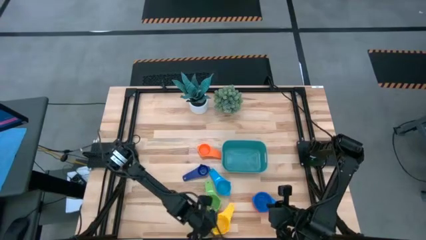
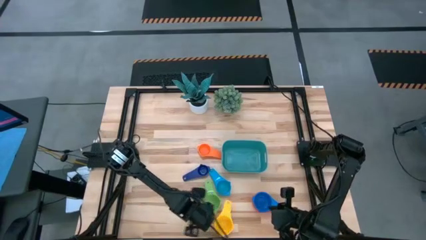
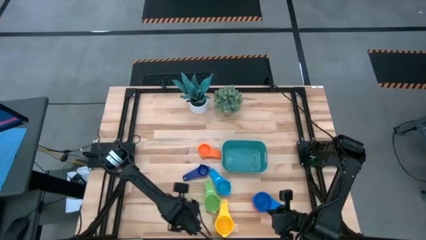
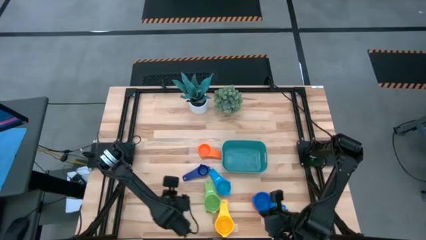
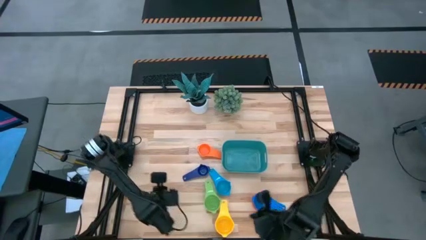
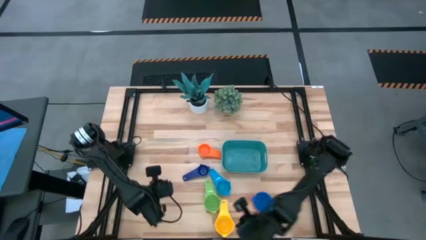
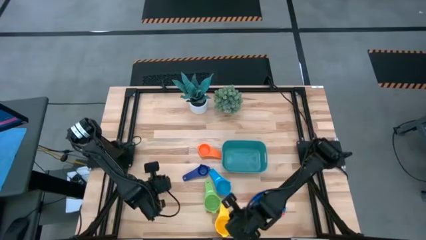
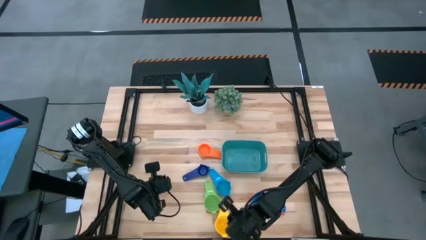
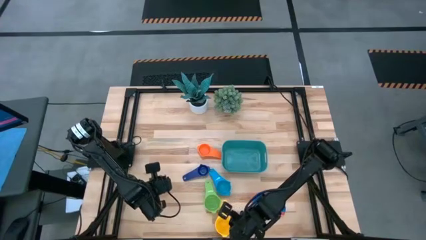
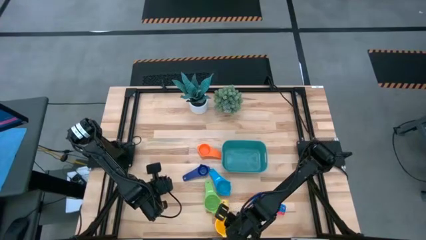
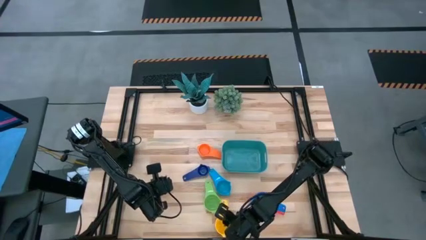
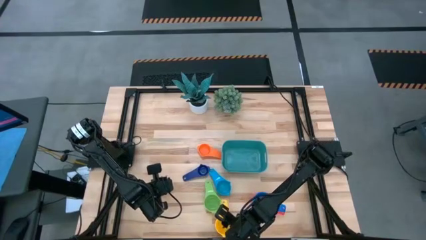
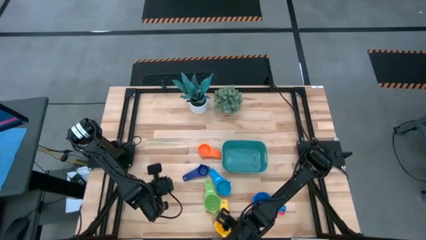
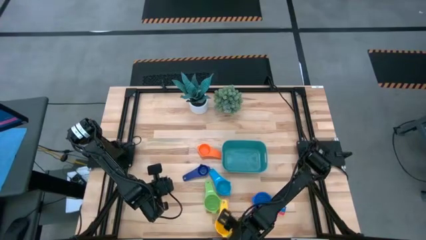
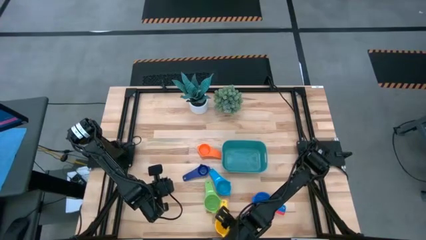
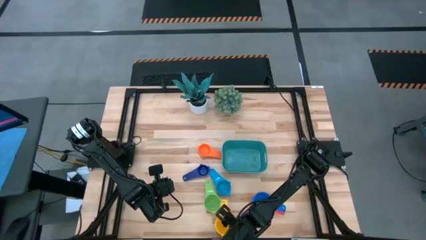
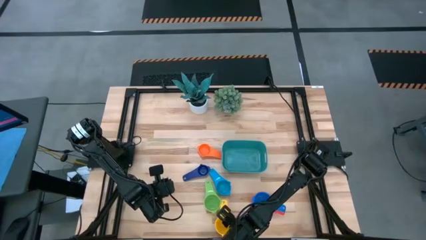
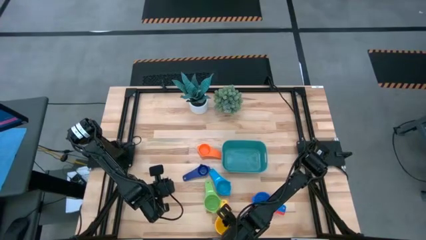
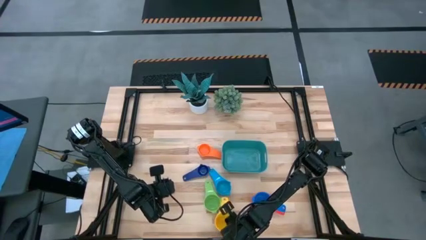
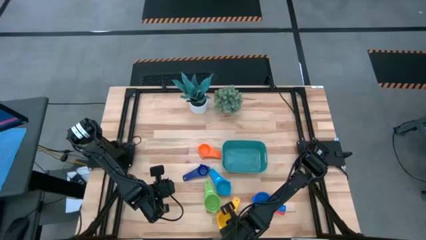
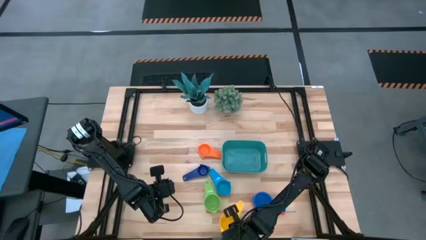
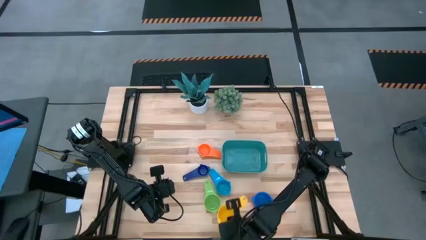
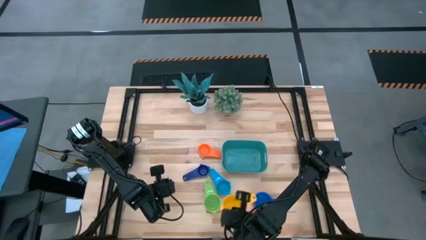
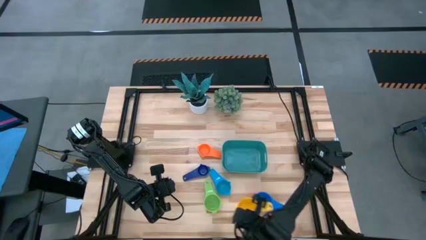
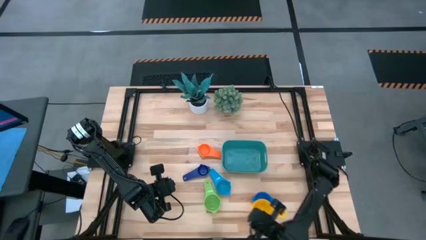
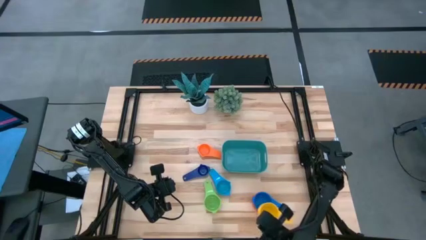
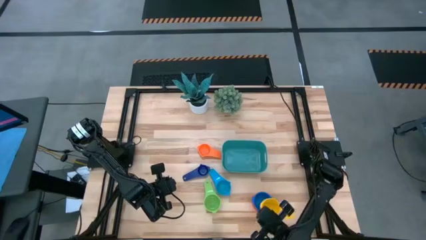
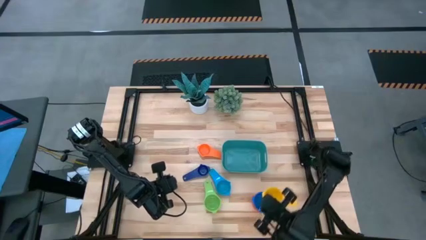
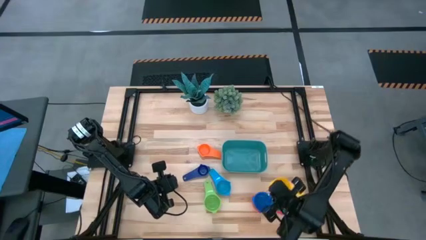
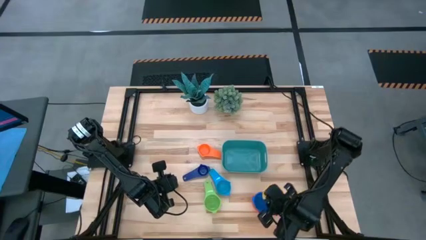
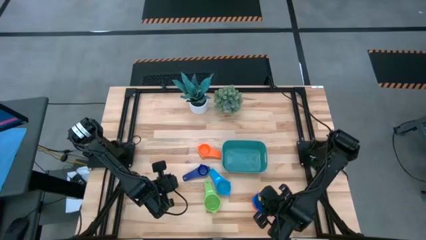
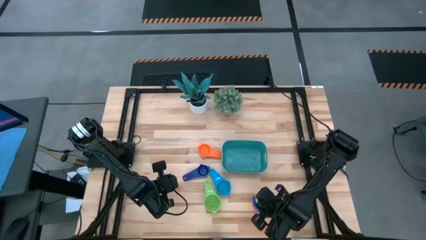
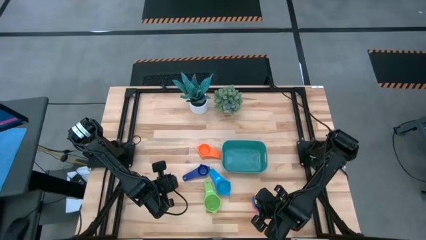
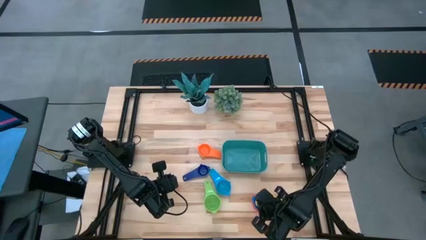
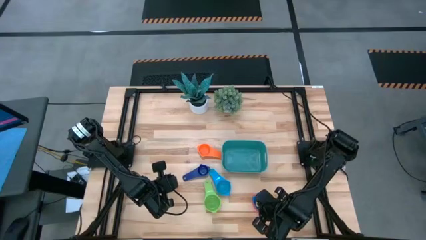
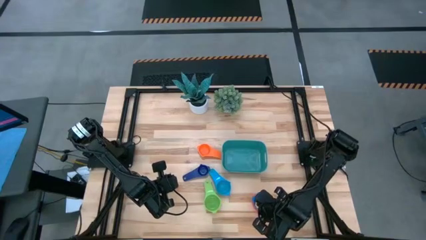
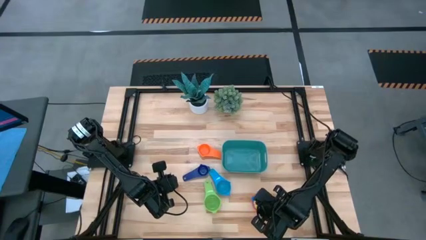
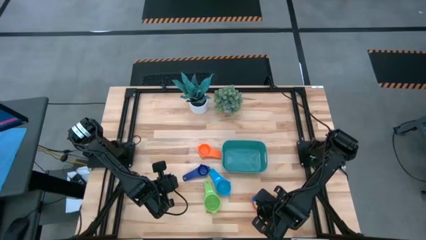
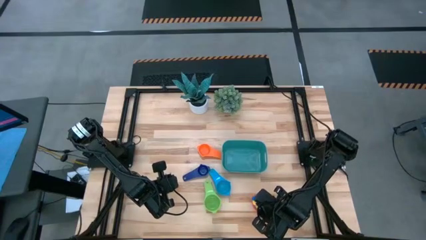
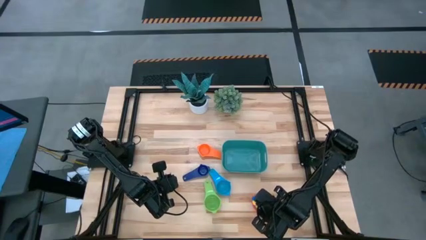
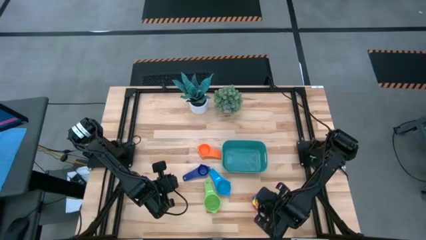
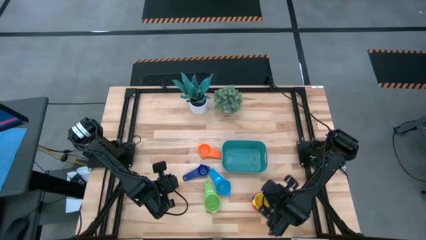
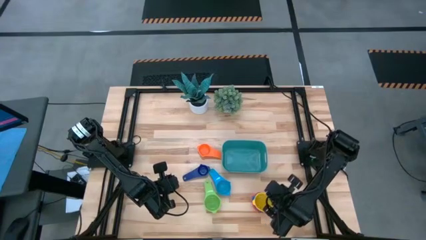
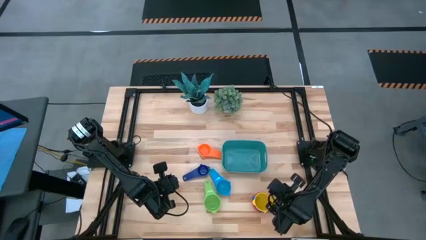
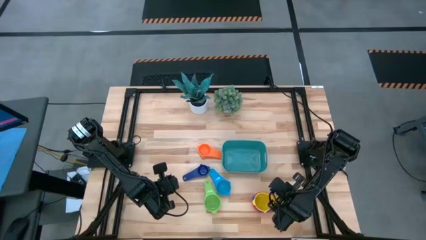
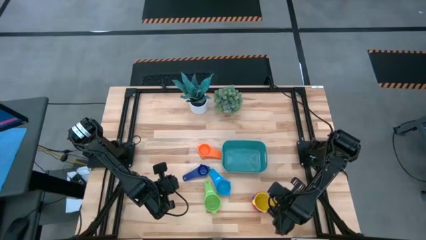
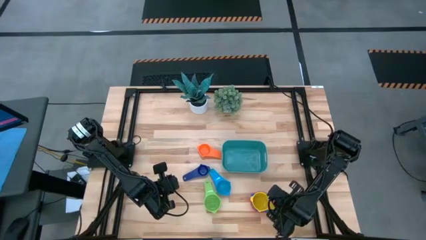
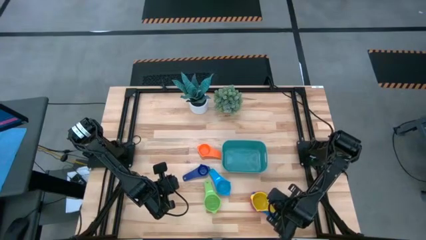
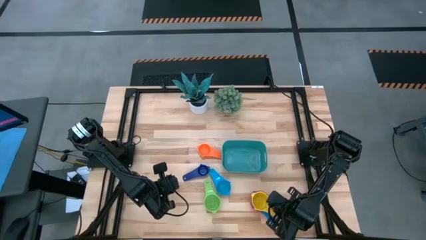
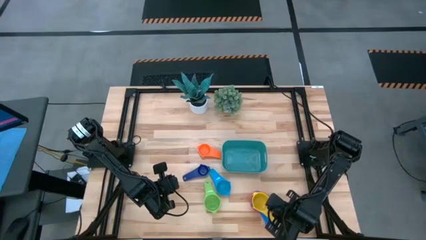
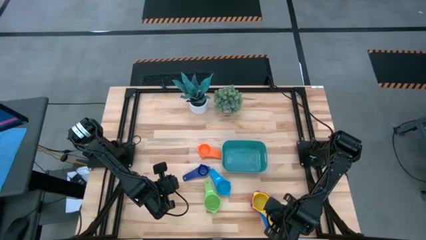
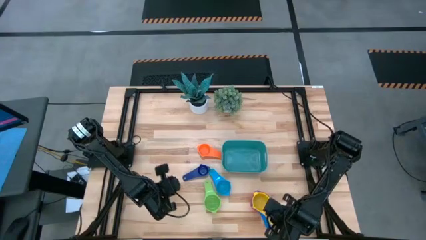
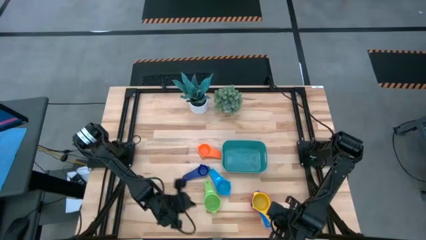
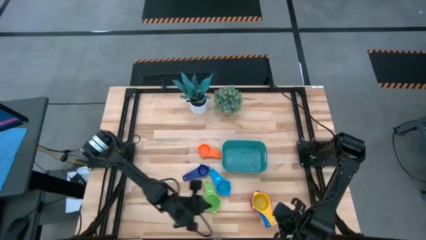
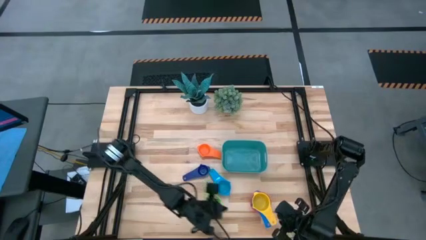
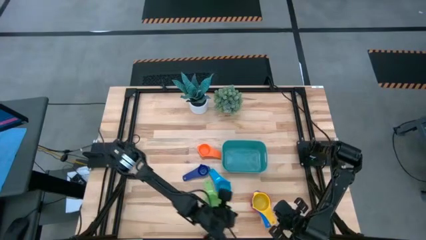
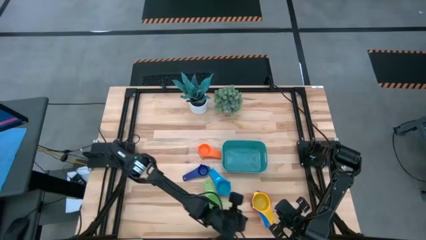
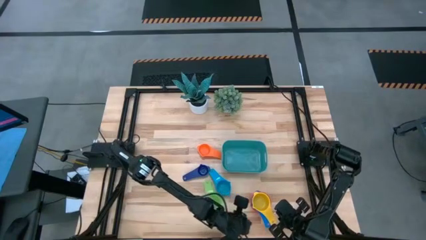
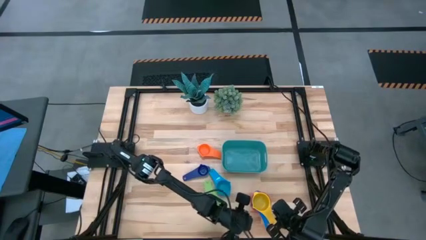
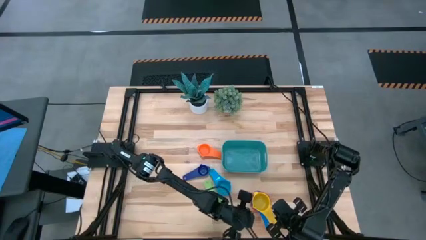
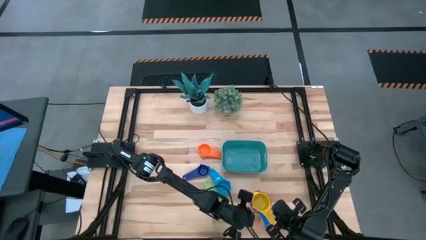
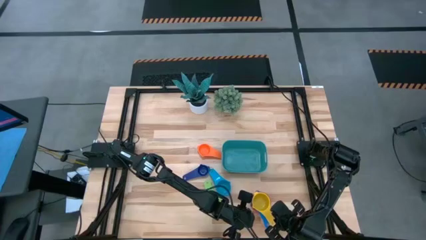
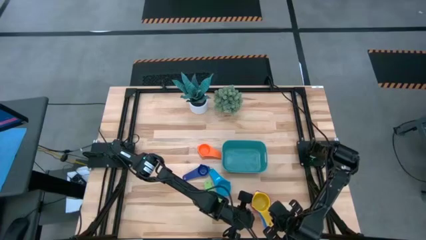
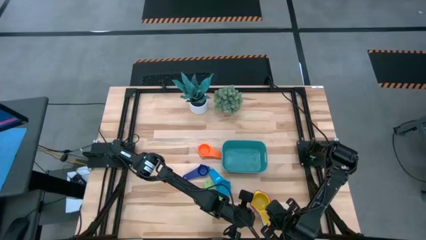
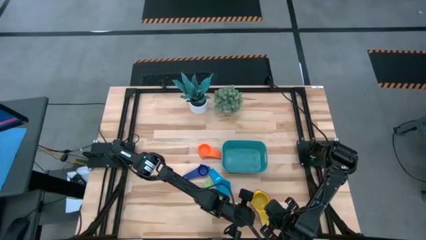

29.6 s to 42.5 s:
Task: Nest measuring cups in basket
Stack the yellow measuring cup on top of the blue measuring cup
